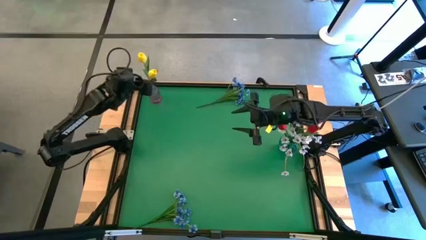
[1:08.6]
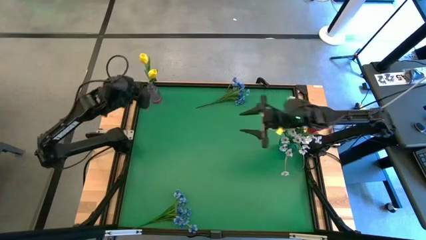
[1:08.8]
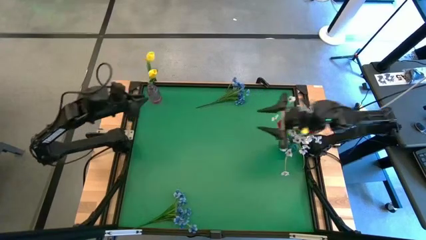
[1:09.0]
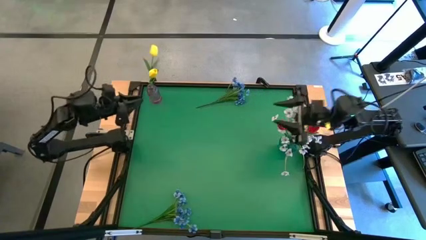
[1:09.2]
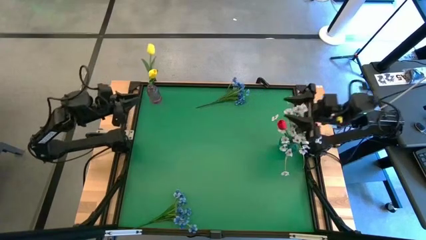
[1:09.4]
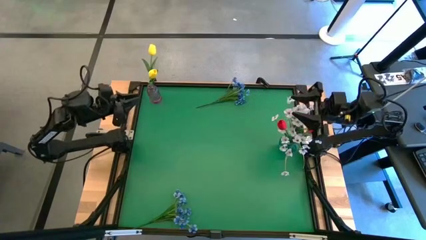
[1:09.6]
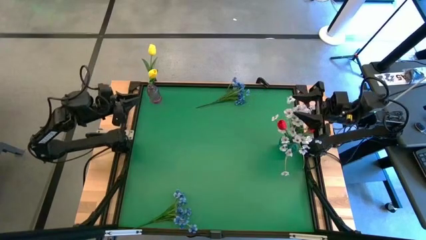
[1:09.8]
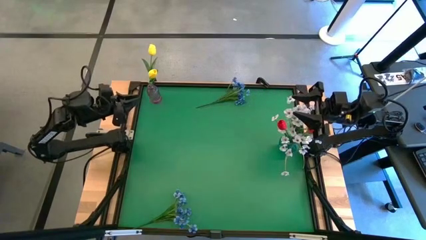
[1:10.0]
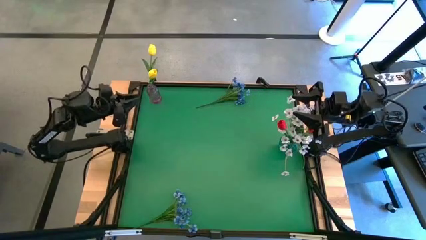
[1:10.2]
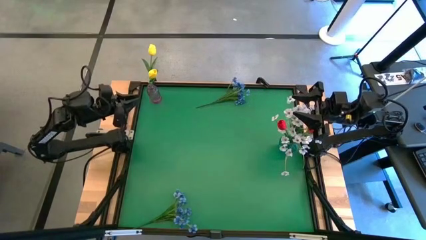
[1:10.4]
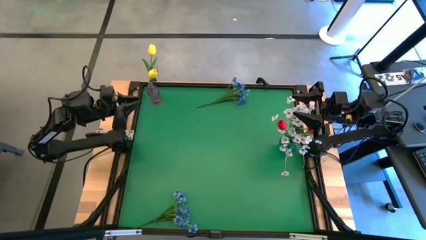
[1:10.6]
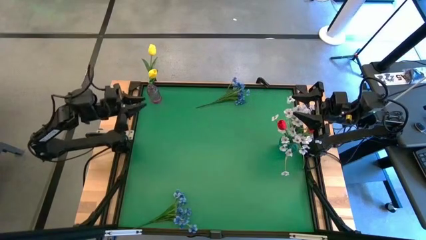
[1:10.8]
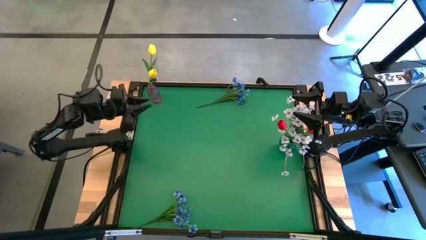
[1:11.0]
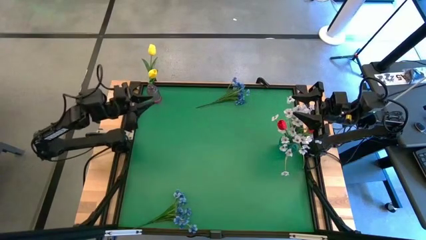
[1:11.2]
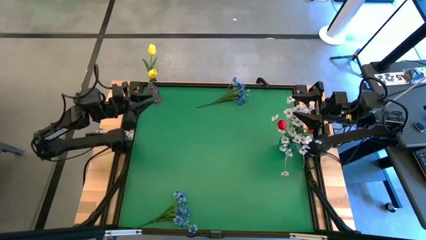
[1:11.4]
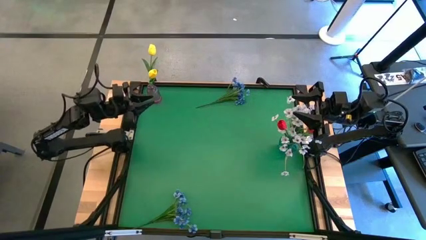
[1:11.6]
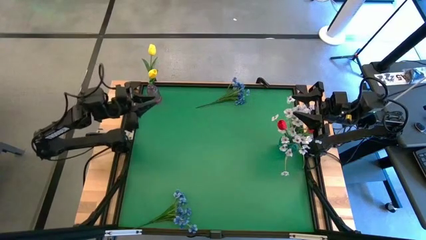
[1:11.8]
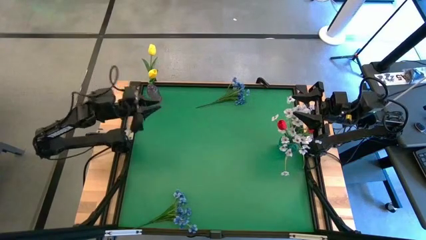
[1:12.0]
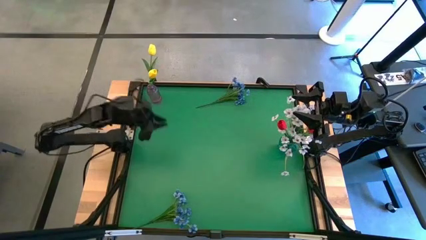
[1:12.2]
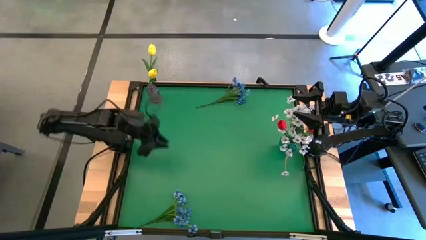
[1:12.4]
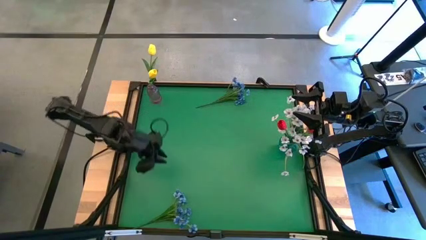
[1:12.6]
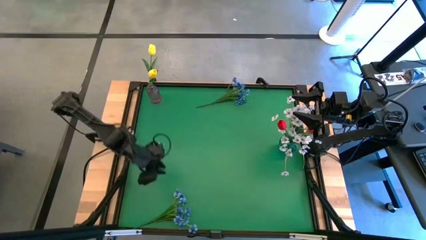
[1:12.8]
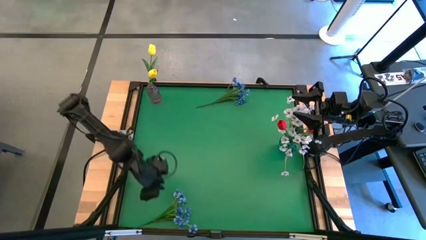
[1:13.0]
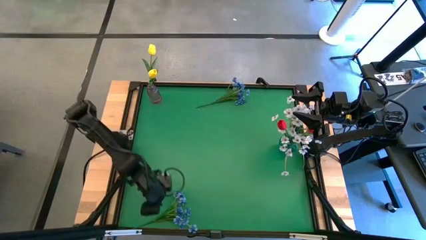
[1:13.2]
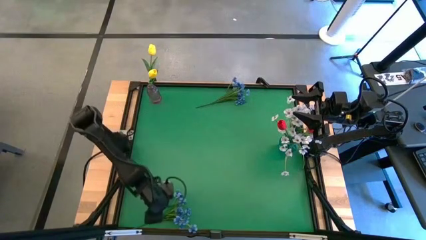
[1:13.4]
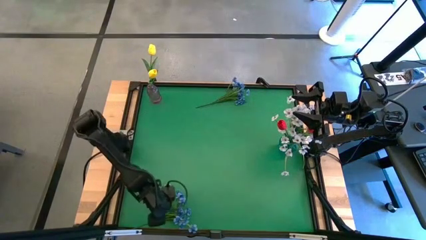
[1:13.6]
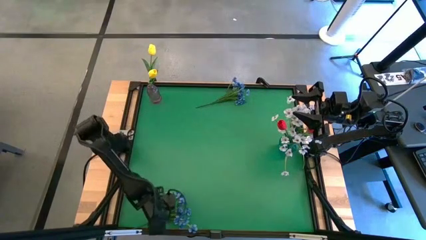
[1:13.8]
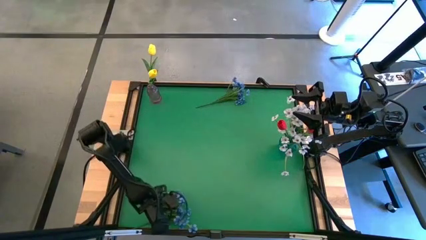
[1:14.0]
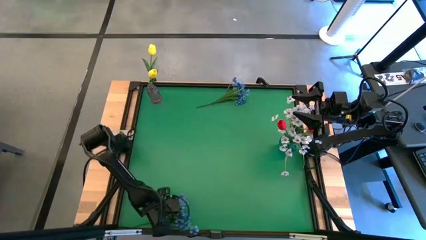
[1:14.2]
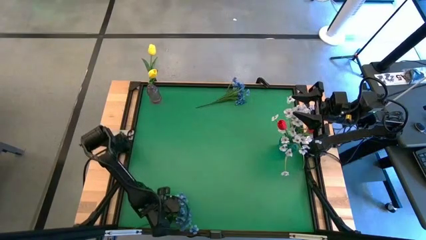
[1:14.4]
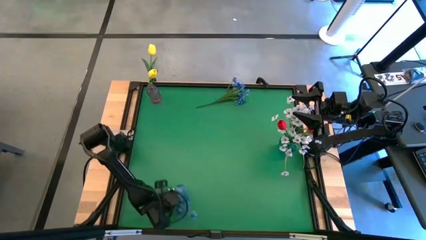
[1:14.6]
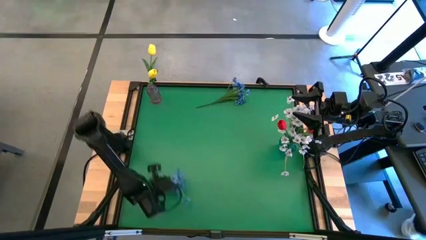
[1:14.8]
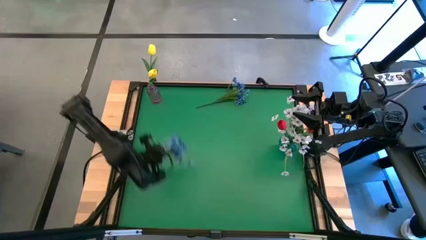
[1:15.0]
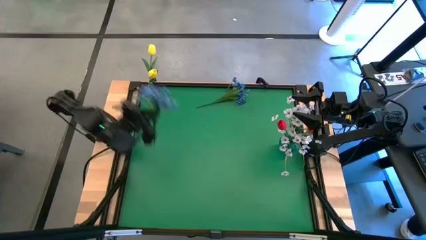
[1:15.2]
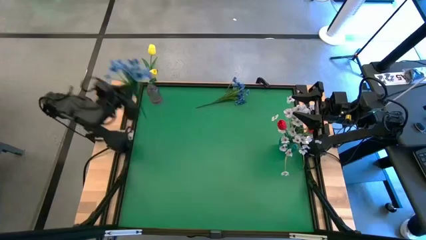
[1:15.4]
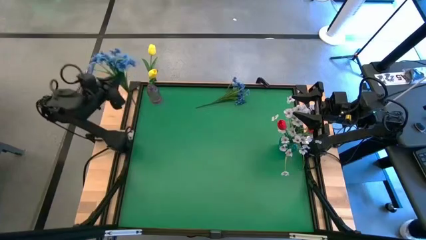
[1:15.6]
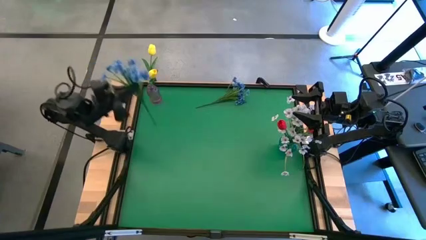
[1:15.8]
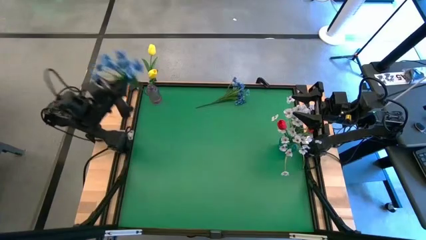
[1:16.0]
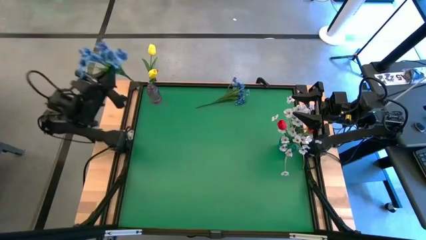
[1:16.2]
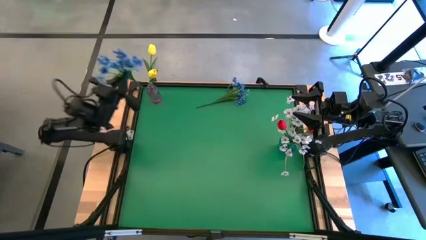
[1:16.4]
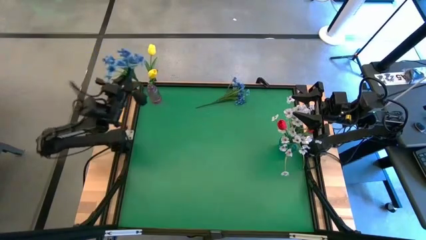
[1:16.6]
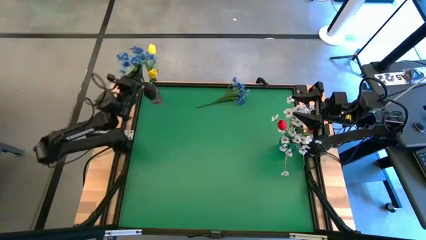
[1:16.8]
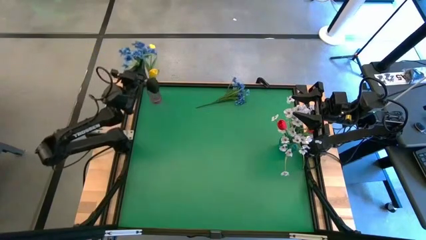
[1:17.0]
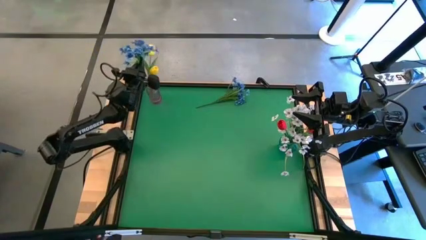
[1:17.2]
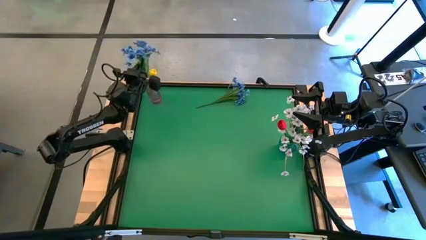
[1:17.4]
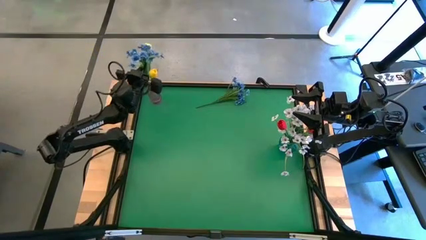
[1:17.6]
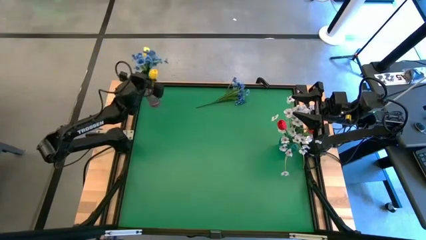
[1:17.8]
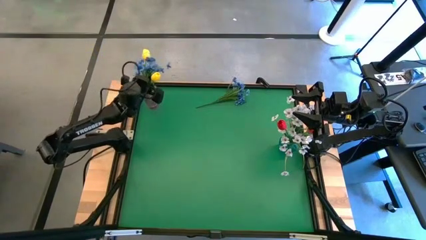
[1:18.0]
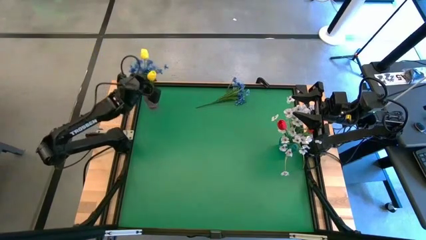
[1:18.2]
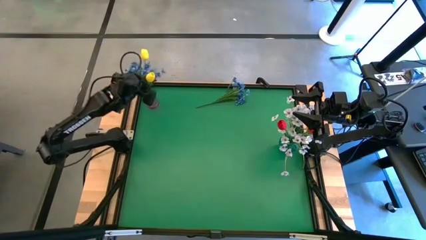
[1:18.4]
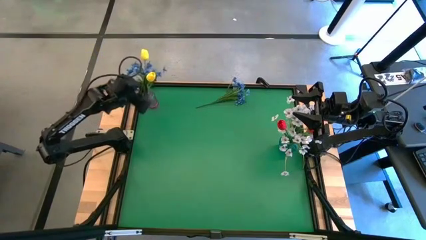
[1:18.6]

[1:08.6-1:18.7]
Task: Sort flowers into vase by color
Put the bottom blue flowers into the violet vase

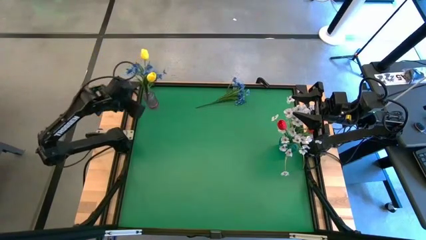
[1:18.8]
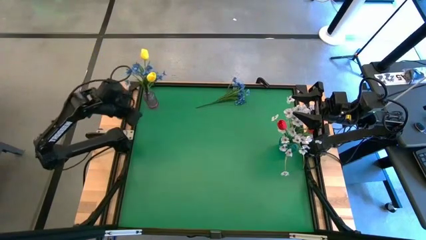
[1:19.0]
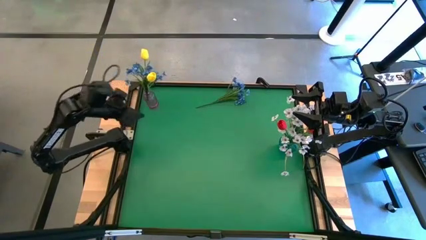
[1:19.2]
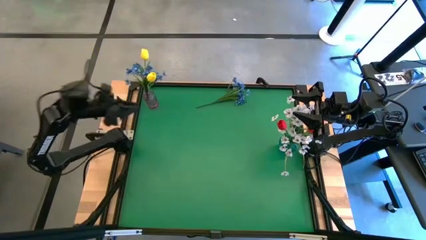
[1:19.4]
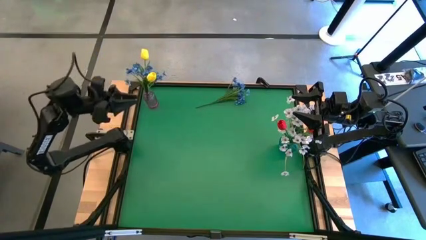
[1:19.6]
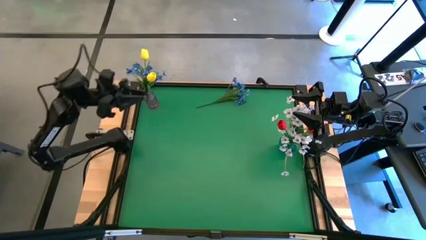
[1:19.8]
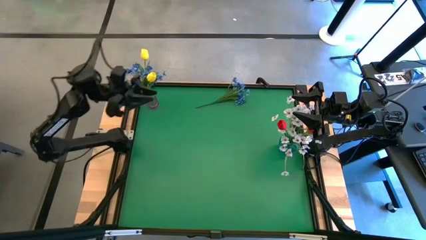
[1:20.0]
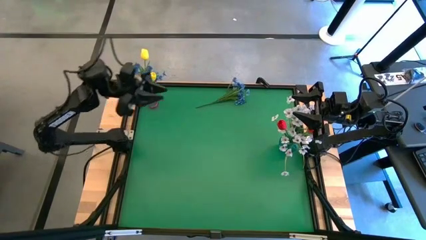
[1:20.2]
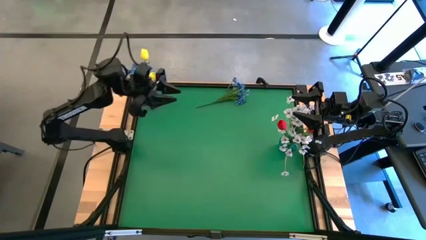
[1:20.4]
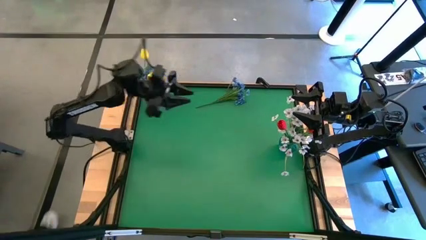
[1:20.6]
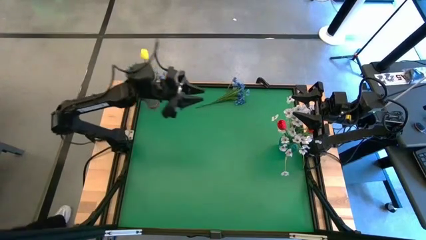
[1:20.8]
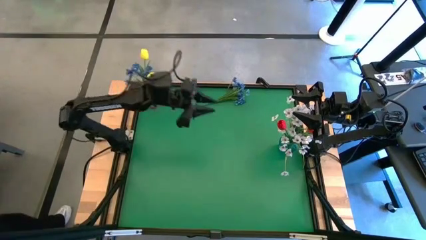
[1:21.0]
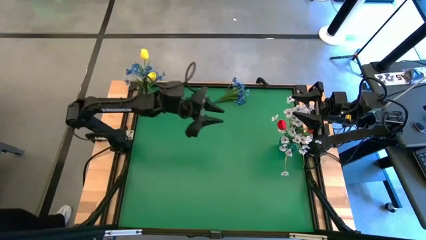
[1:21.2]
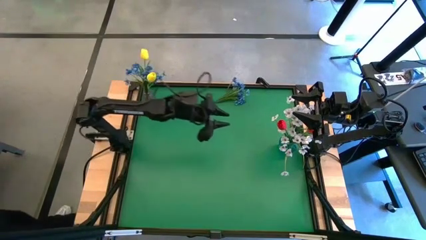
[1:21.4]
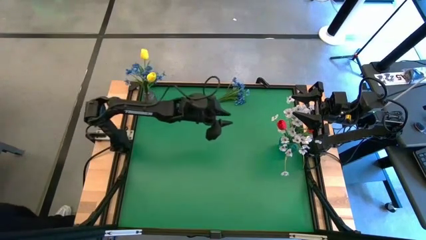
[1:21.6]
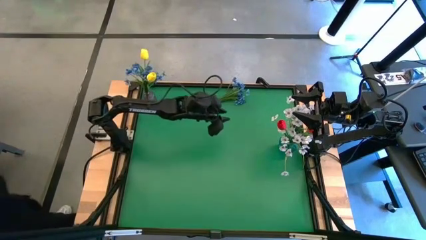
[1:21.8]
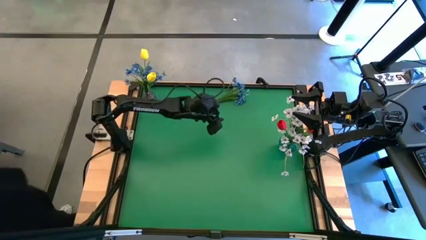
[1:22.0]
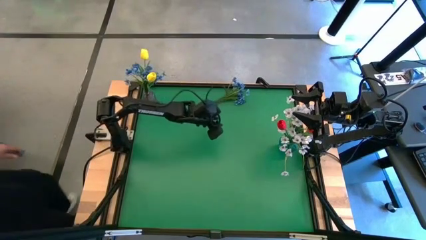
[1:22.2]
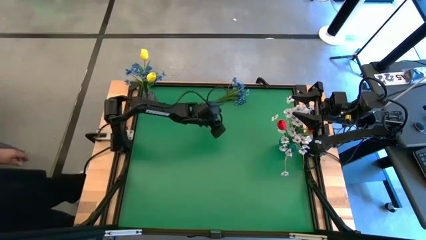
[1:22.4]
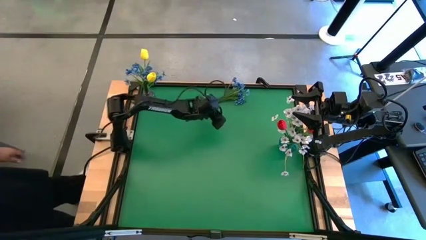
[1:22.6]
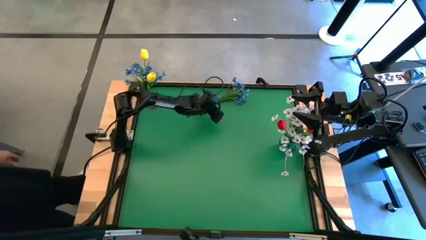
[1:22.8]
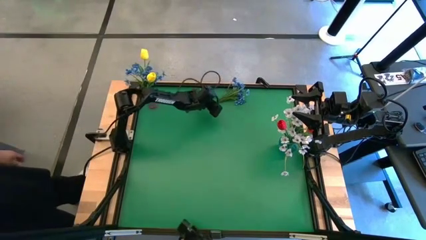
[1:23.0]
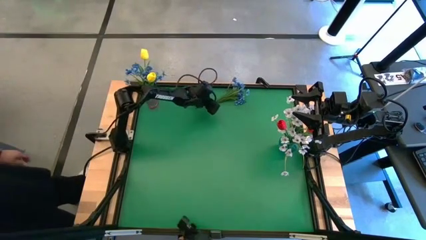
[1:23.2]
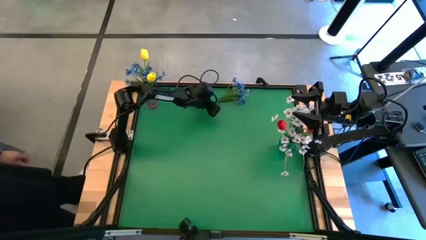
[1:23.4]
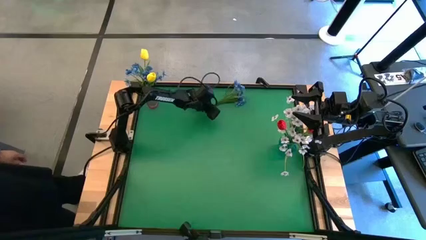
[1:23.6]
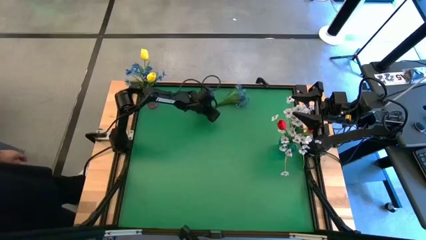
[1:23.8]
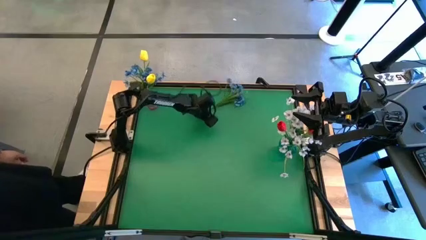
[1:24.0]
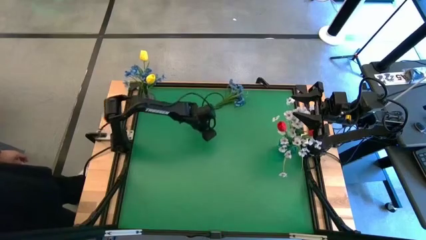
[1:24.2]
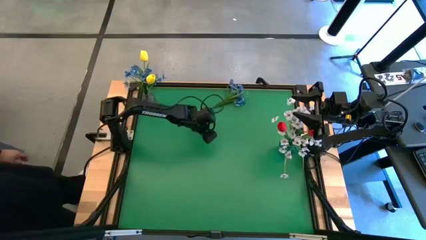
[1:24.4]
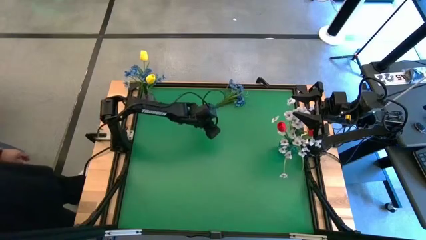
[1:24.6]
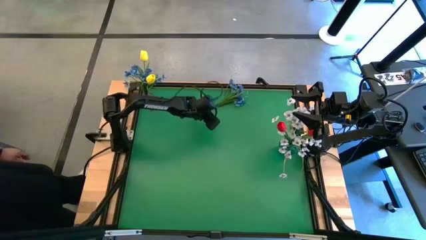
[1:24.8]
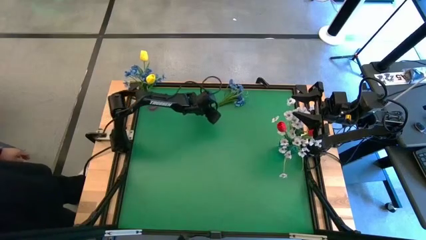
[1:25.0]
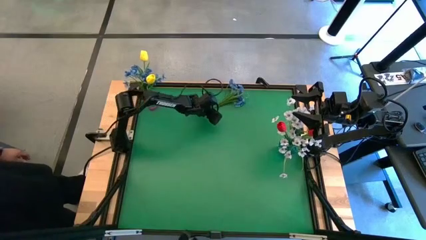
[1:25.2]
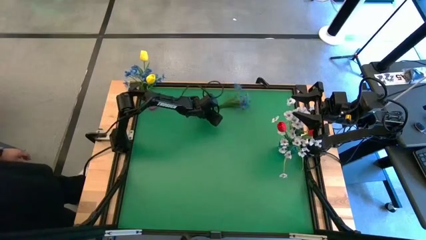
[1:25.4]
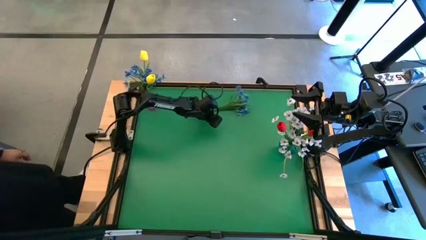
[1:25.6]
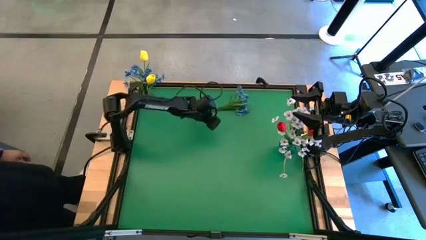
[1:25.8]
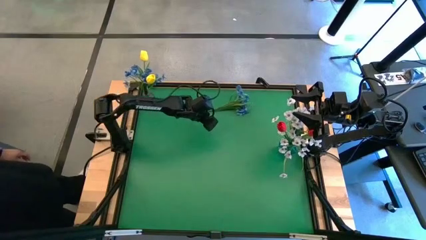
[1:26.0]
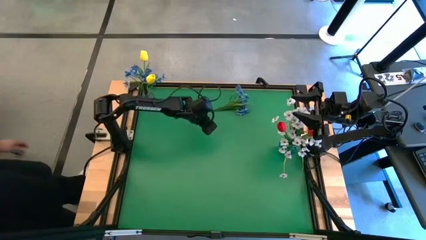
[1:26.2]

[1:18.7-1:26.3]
Put the blue flowers into the violet vase
